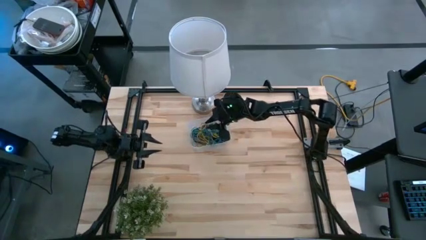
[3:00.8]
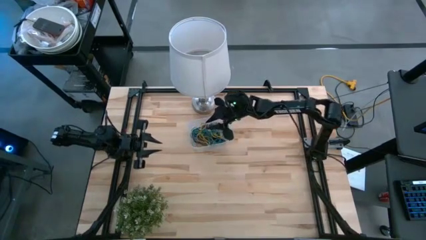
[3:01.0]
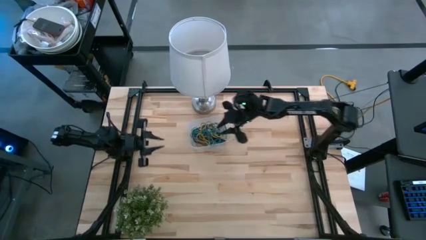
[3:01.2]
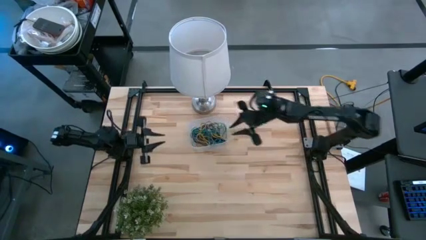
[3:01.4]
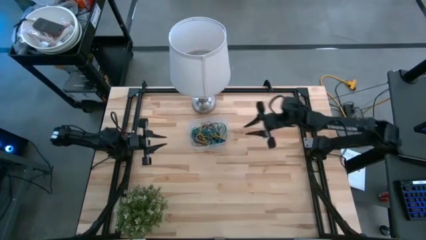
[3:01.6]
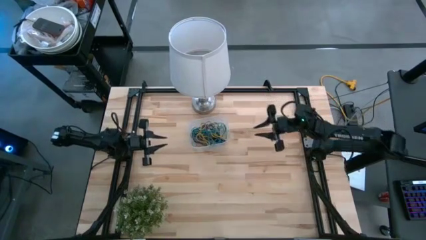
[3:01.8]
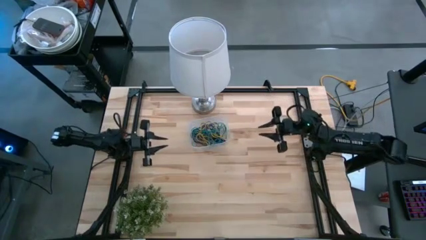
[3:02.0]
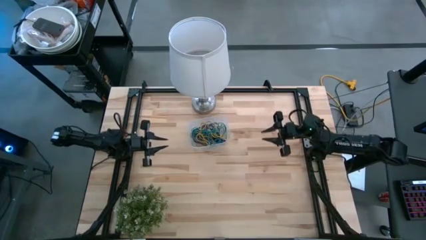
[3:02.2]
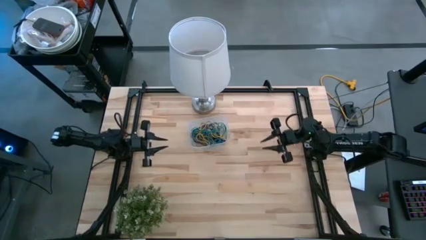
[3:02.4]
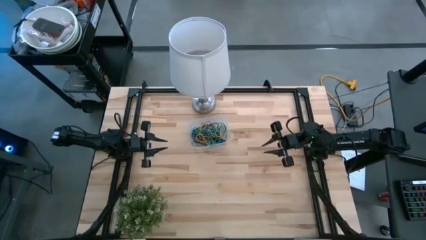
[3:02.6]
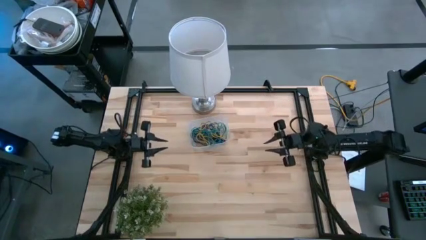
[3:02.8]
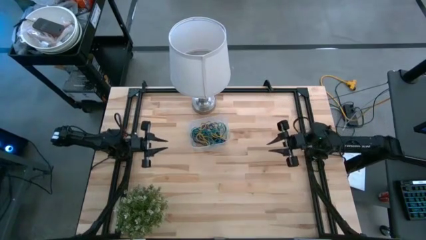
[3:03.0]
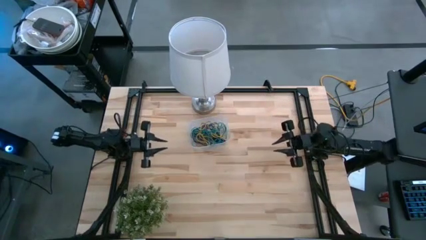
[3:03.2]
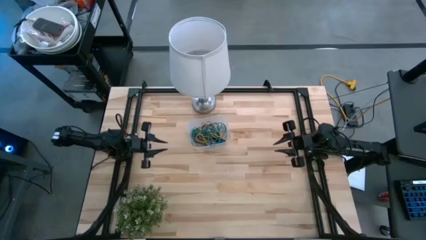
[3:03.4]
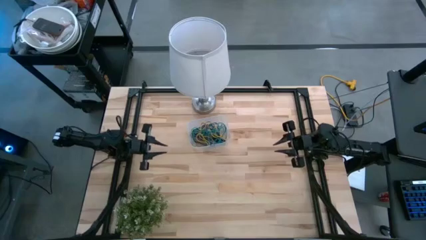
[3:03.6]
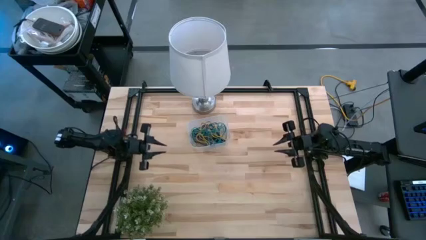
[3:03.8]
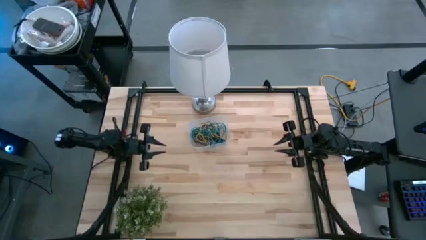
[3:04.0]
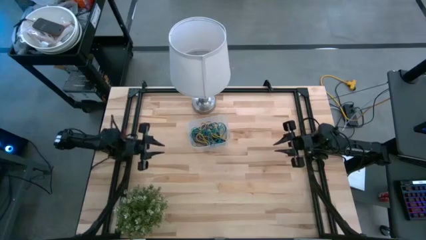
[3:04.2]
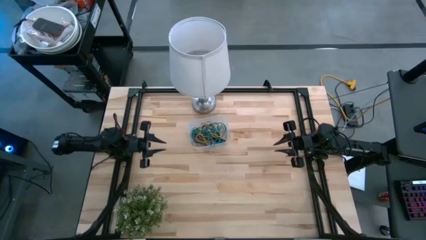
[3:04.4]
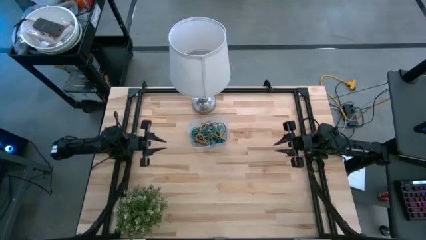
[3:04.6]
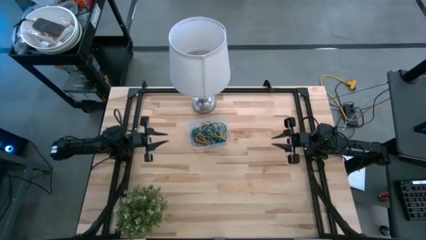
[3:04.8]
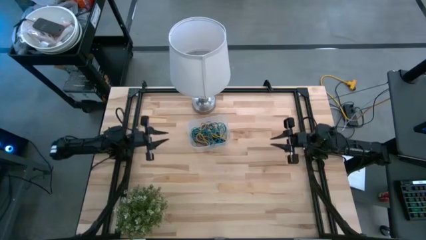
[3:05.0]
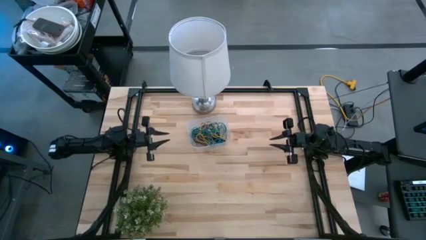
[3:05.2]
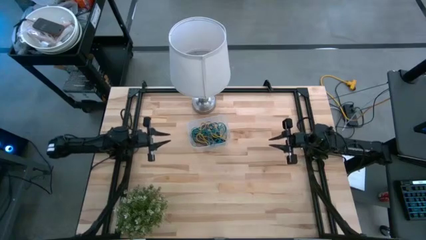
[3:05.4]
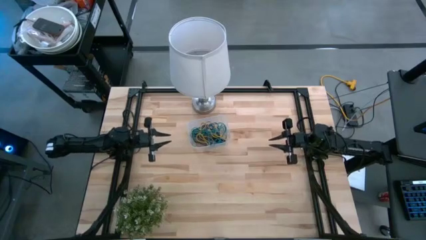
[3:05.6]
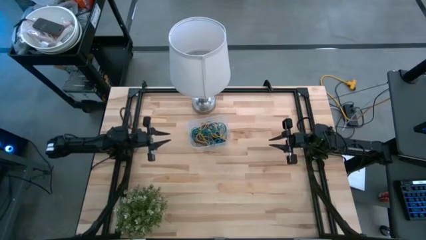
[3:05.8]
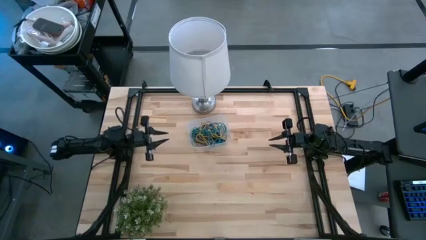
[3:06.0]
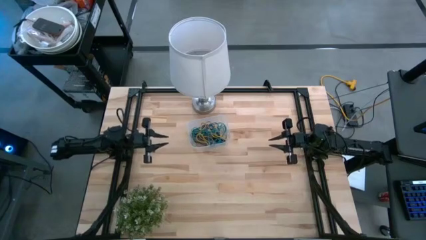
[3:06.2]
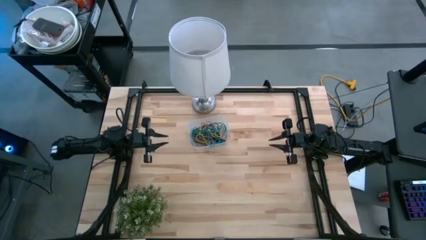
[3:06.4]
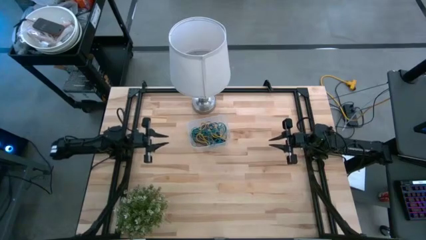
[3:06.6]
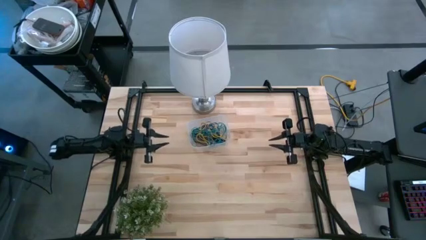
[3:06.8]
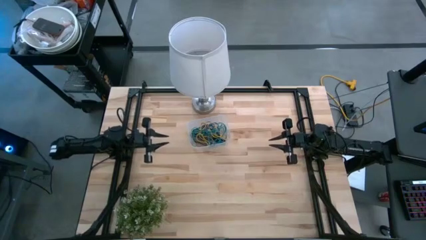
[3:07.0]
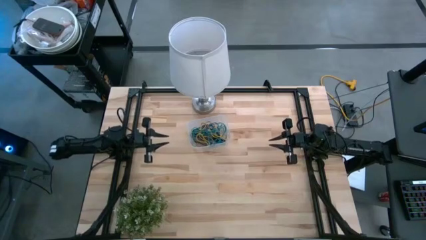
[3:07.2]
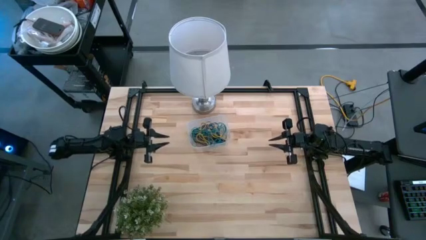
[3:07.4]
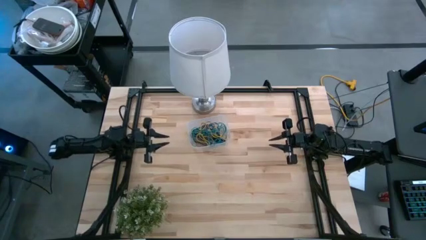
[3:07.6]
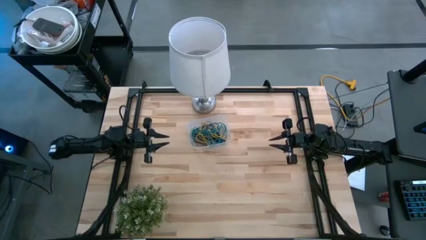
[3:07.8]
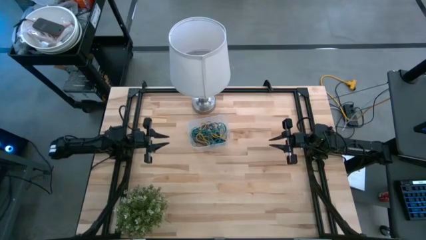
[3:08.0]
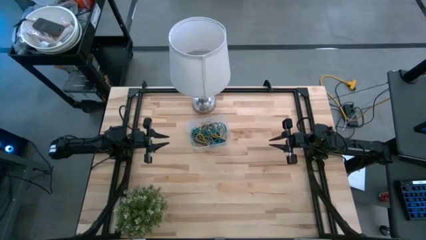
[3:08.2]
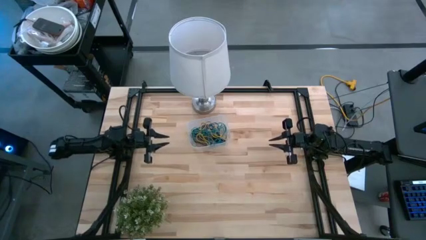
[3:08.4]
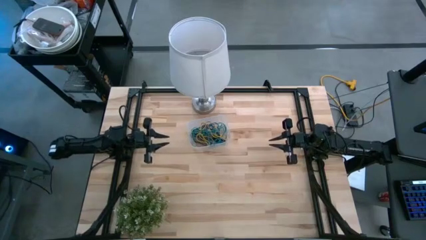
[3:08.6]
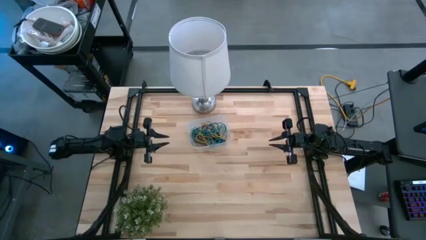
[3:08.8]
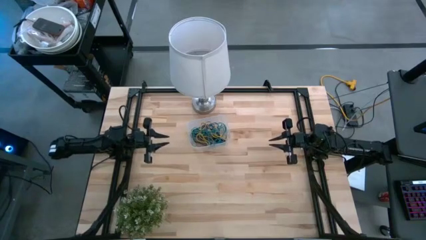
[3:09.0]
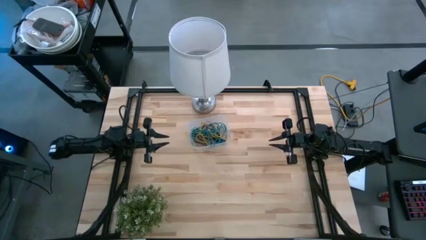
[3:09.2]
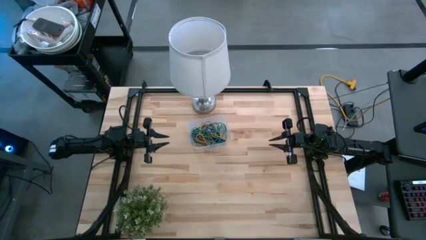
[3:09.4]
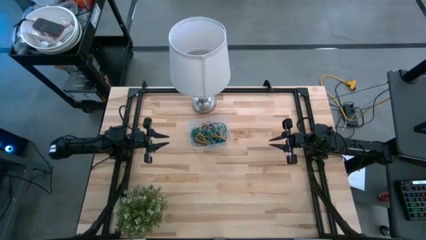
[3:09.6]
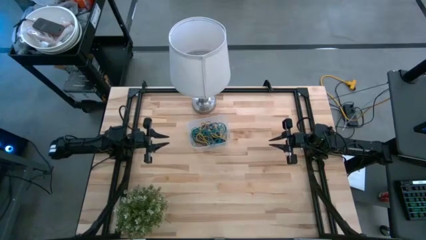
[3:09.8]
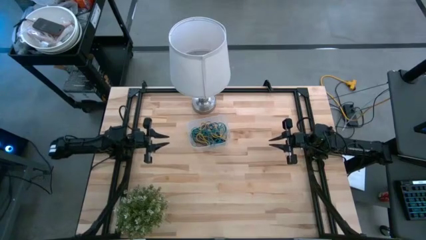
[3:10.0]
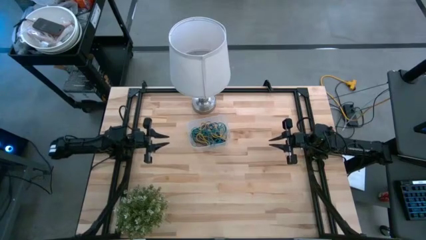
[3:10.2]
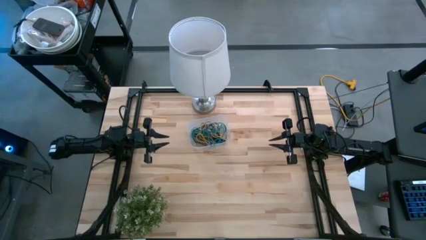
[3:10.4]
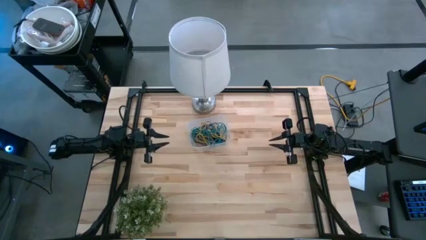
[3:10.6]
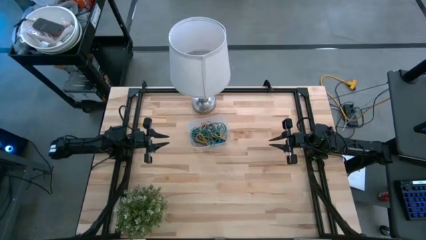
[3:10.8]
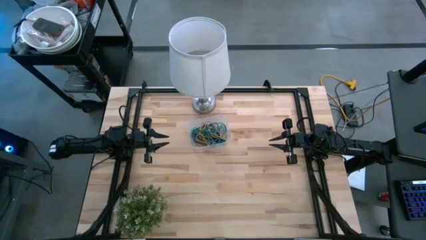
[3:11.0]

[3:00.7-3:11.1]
Task: Pick and place rubber bands into bin
Return to Home Position

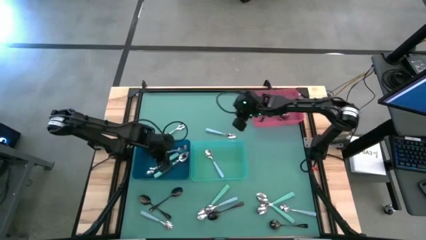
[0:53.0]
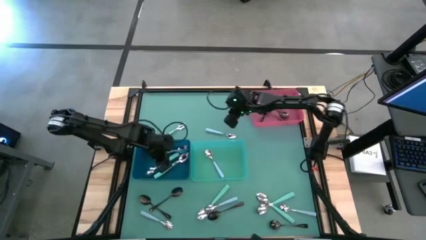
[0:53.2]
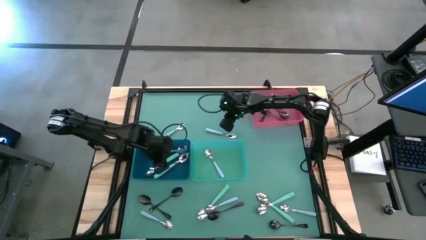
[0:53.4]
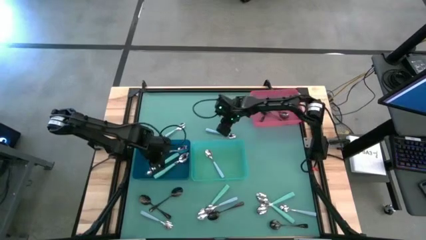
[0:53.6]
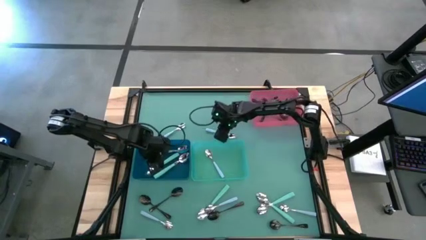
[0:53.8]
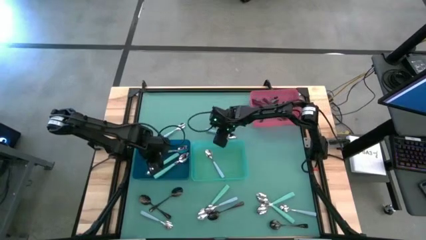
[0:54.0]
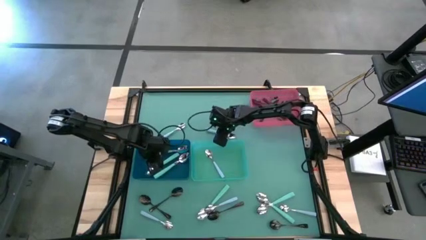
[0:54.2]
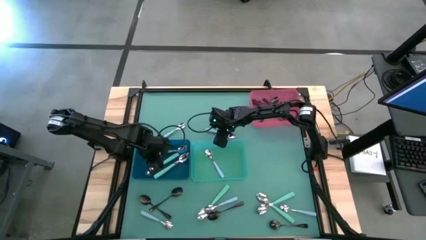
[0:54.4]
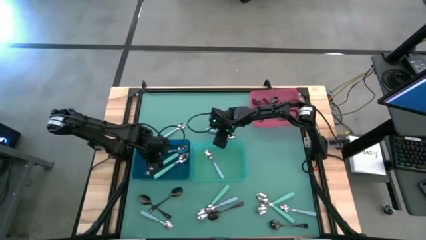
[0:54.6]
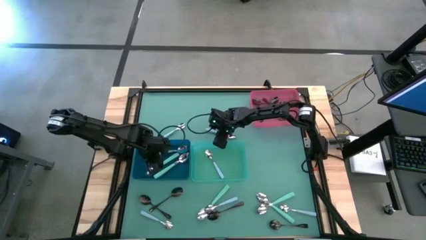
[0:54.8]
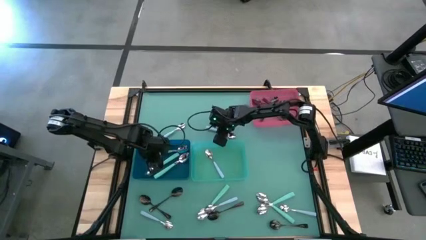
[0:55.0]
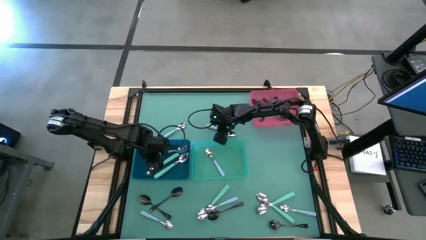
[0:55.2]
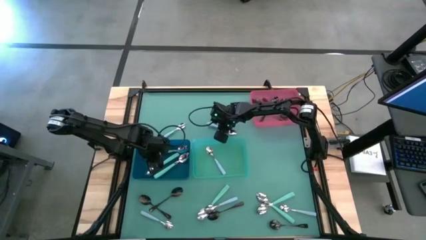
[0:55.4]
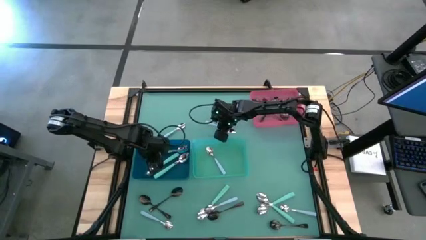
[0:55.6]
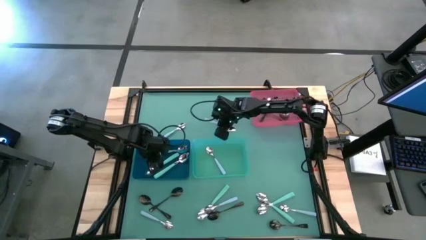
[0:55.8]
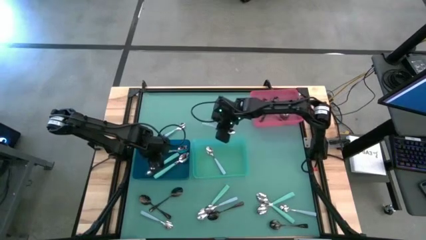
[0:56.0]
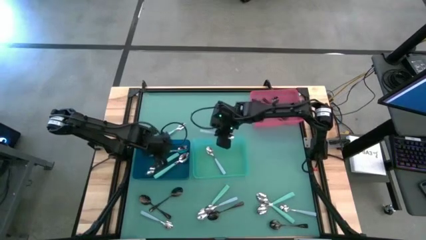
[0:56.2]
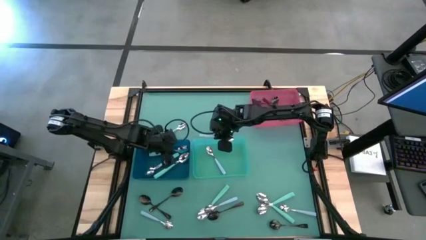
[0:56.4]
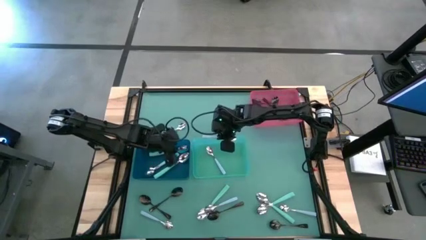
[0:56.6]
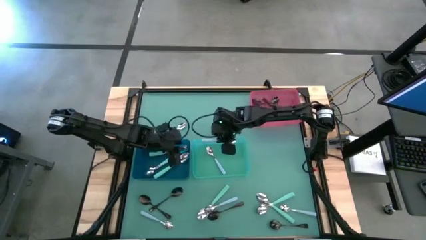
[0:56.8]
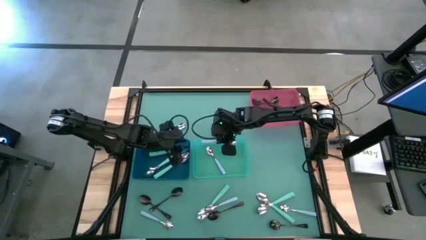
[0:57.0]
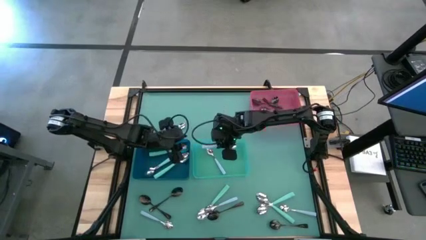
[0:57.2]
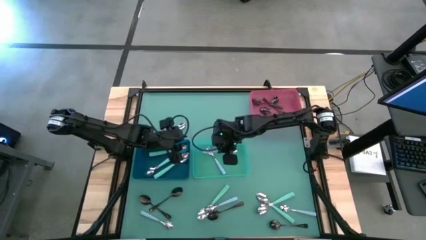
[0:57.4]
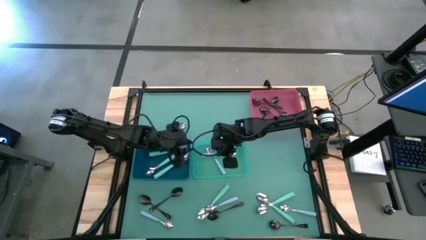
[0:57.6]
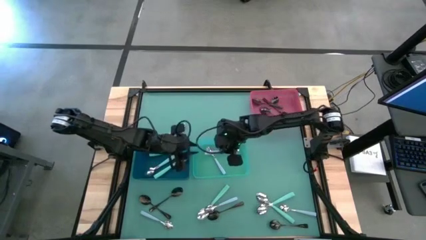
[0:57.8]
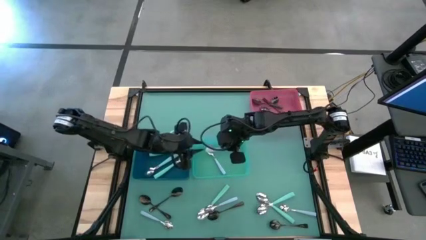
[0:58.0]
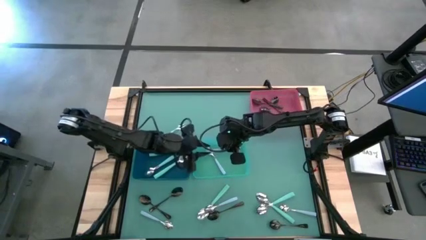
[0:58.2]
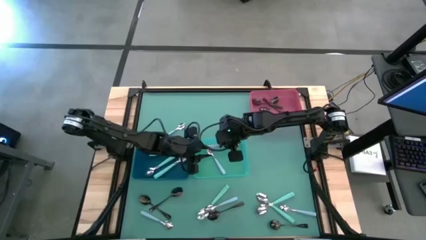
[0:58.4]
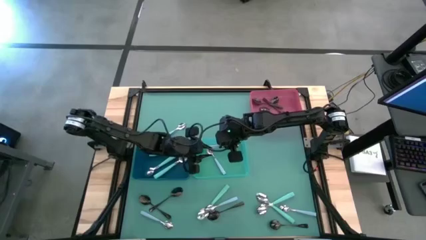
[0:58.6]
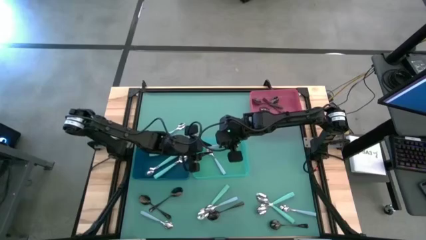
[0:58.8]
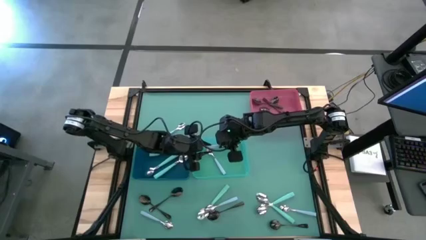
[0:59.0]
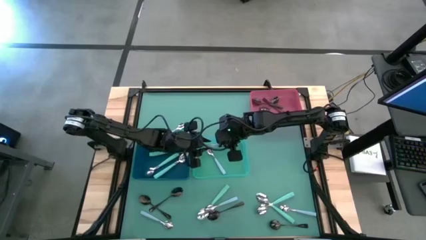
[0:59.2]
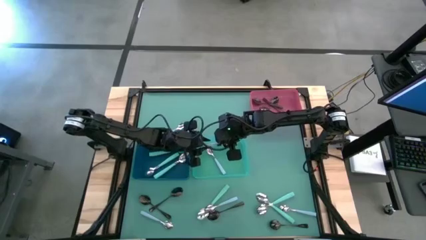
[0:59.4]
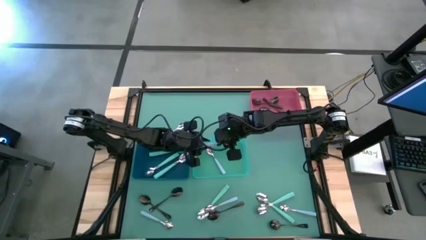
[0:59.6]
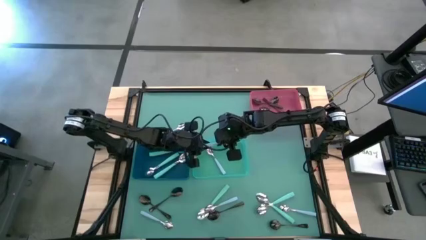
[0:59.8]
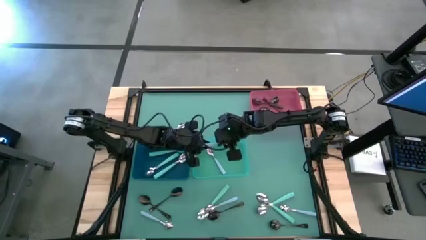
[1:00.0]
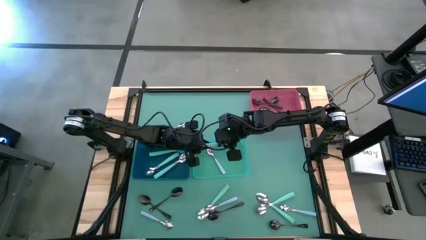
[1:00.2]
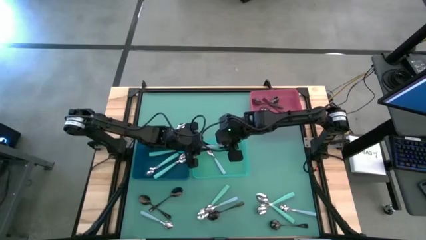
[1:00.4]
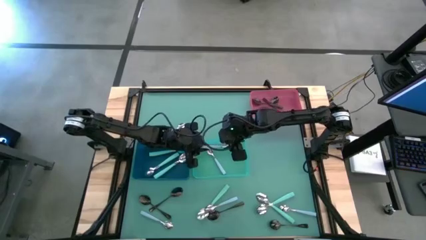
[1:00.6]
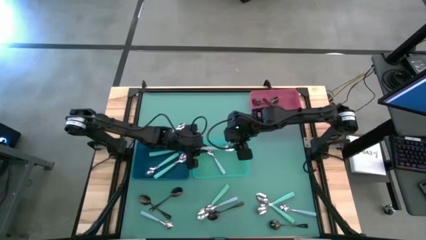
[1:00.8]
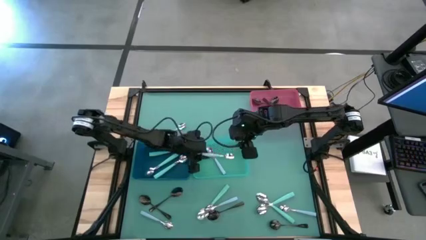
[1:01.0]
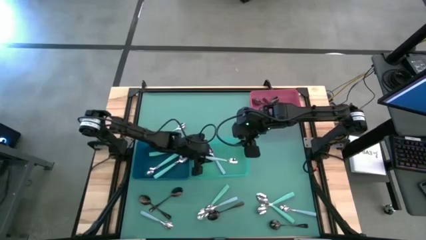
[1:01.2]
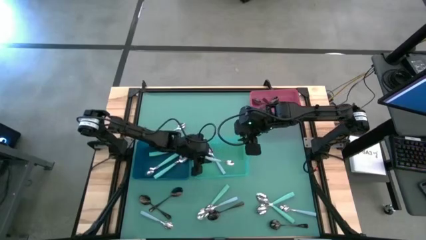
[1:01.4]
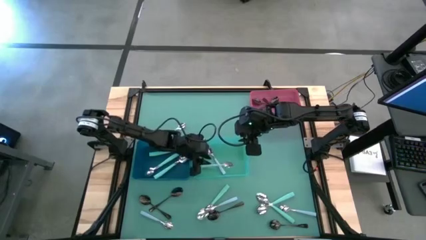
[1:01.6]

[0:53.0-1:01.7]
Task: Sort silverware by color (type)
Put the blue spoon into the green bin
